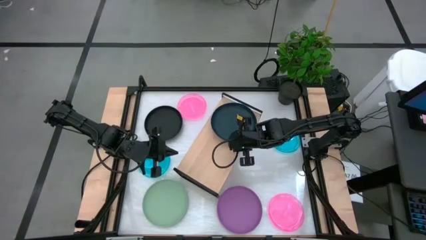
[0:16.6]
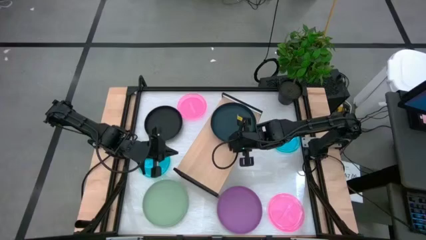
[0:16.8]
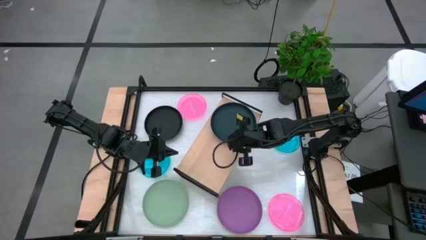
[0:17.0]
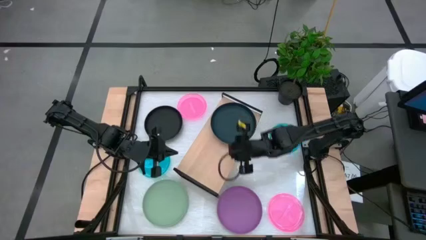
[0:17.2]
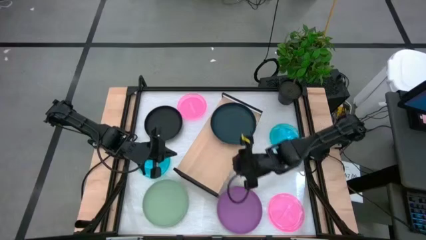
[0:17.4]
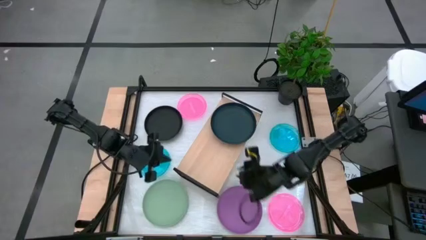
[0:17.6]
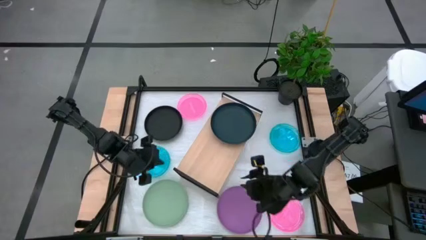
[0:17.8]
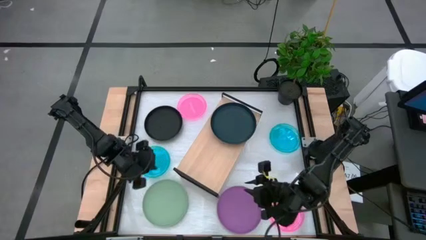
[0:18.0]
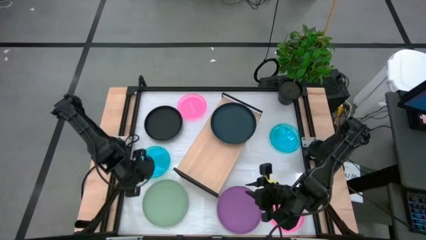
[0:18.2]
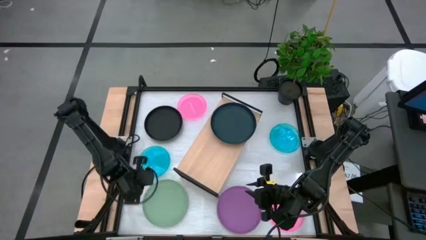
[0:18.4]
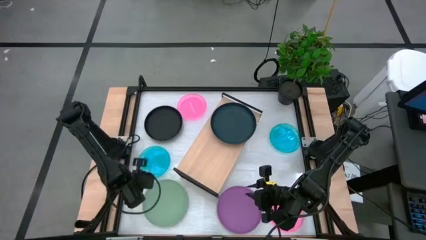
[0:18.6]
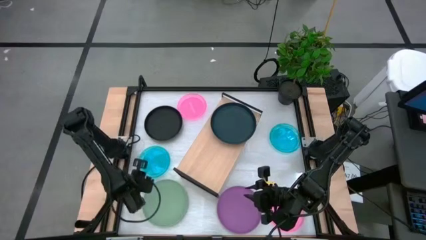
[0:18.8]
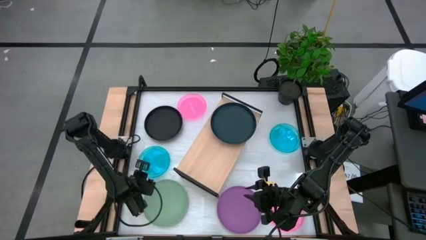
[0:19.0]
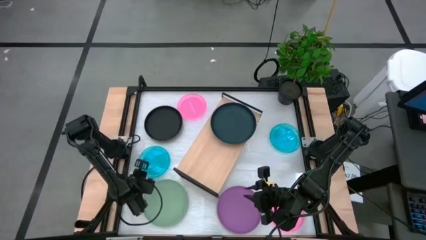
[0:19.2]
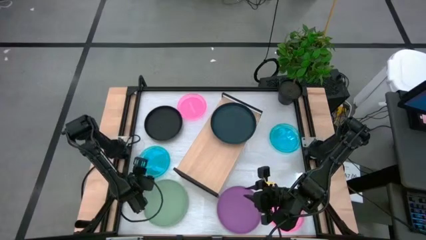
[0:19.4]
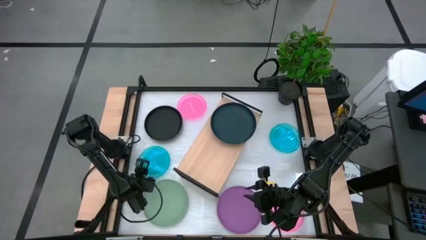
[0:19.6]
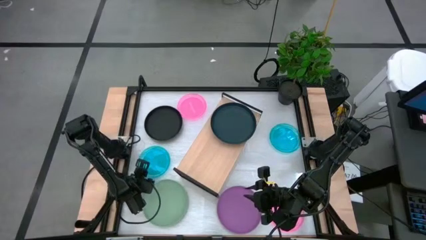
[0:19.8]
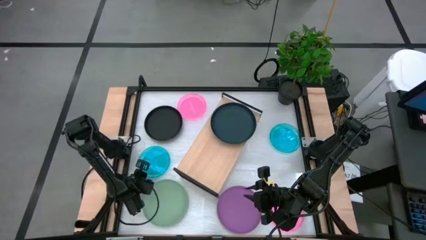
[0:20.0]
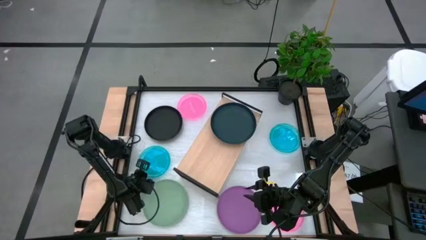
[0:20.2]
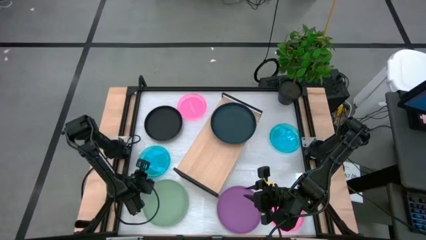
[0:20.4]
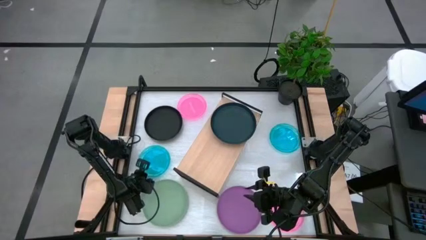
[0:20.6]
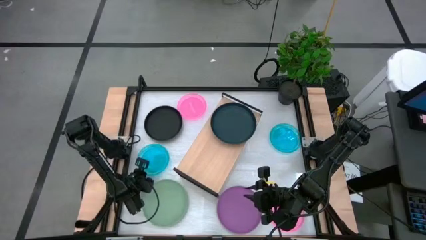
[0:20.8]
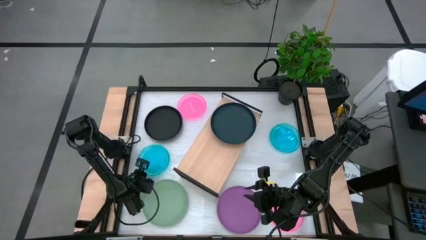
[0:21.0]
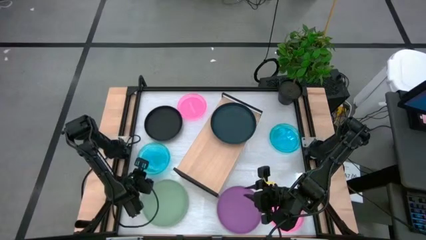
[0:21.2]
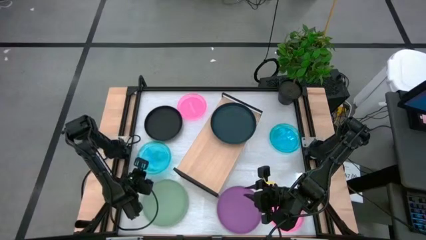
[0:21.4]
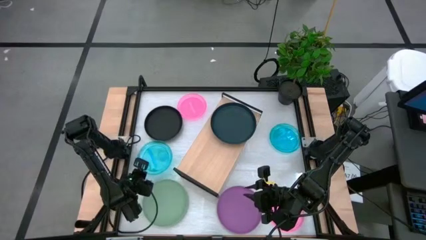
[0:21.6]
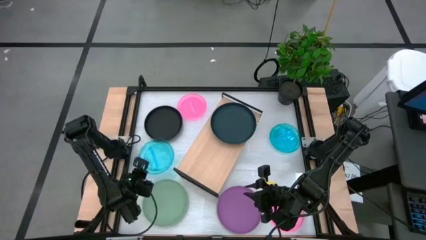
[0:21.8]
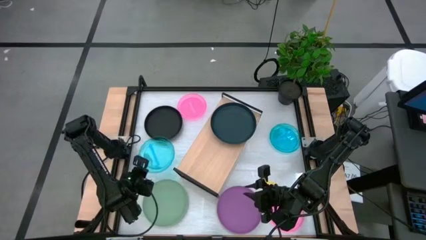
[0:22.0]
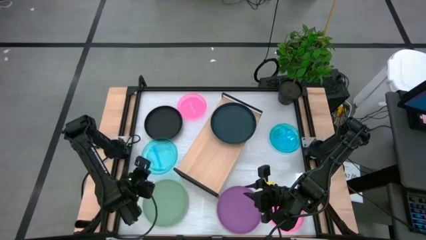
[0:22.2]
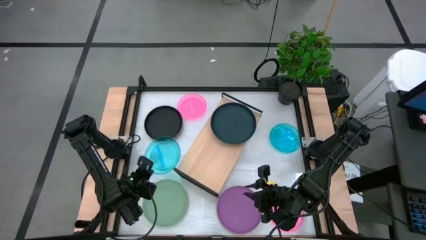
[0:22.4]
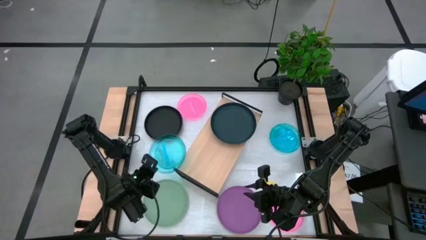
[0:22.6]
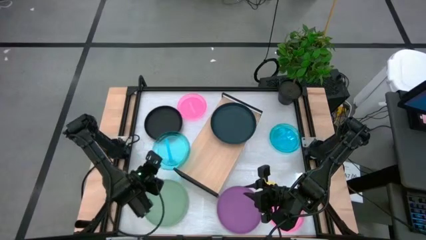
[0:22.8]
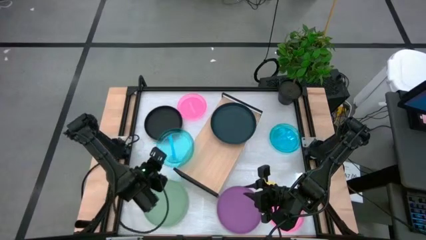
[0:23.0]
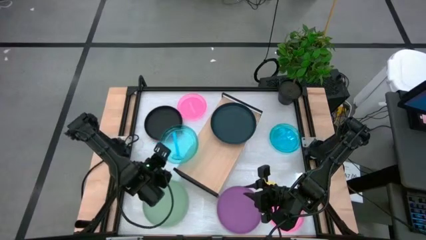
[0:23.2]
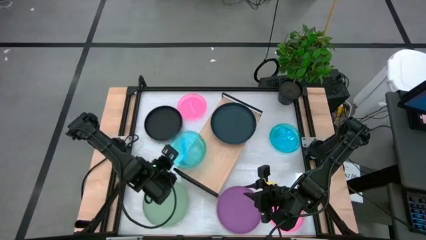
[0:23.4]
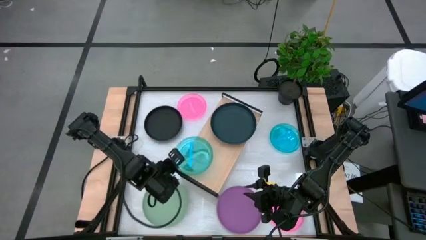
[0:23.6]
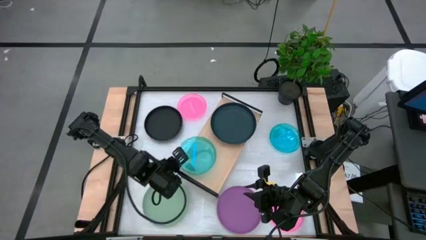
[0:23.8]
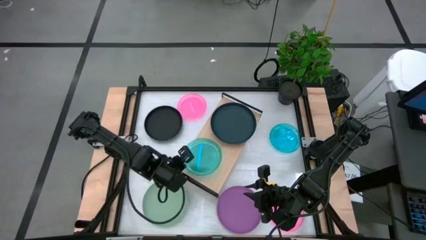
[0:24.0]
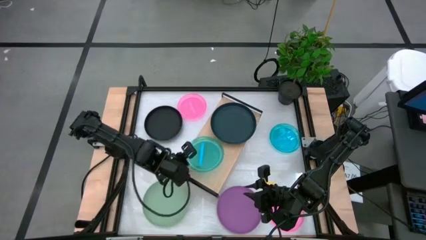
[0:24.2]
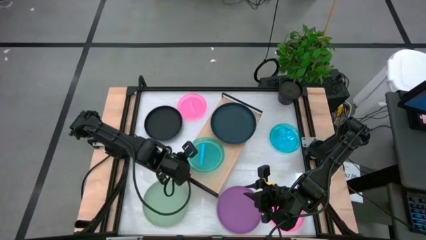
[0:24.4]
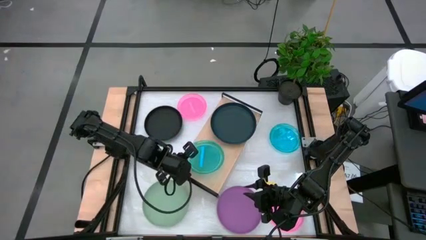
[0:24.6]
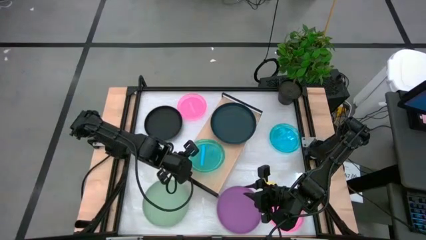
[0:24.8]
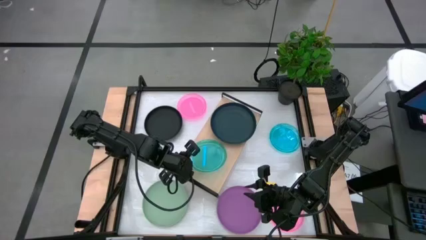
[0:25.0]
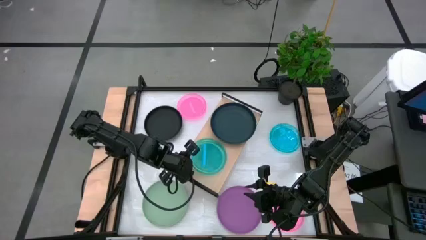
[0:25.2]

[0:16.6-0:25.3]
Task: Place and stack plates onto a shelf
Put the small transparent blue plate on top of the shelf

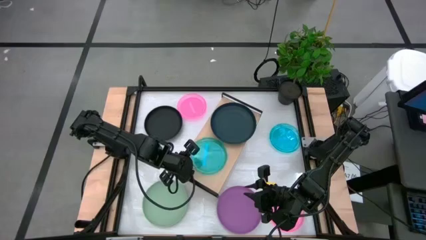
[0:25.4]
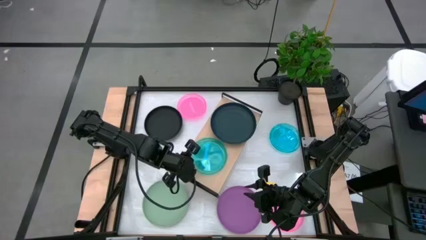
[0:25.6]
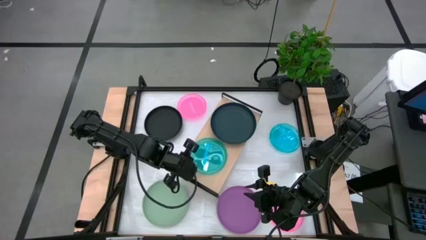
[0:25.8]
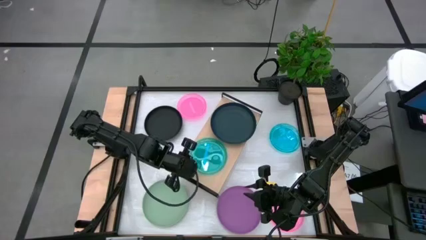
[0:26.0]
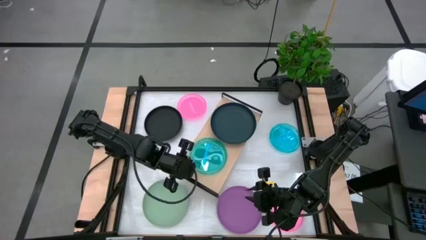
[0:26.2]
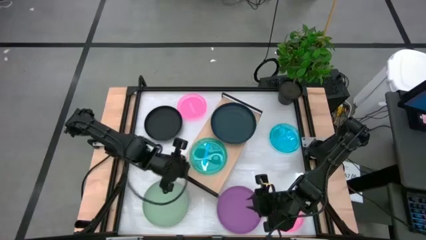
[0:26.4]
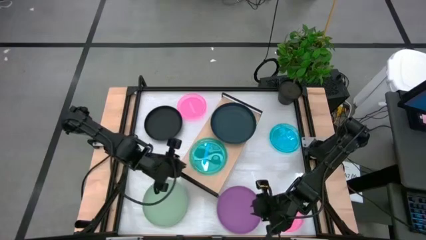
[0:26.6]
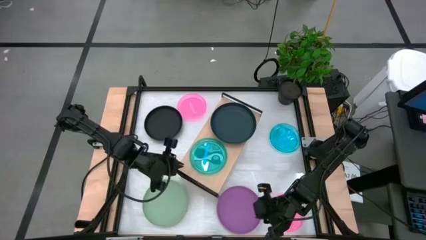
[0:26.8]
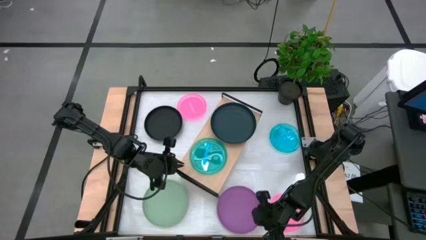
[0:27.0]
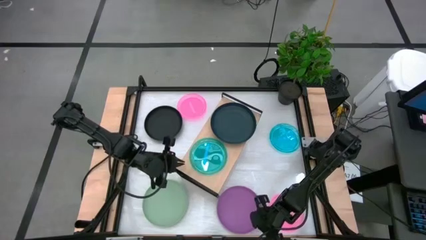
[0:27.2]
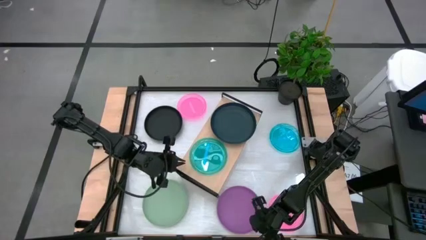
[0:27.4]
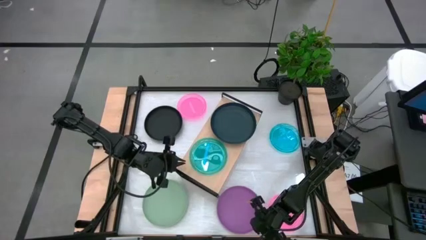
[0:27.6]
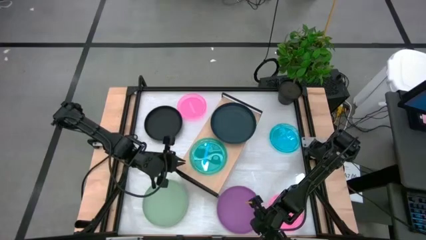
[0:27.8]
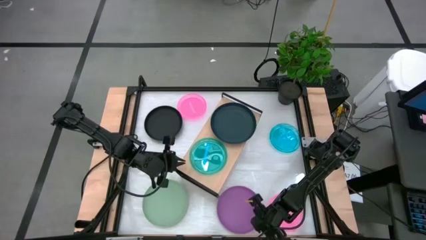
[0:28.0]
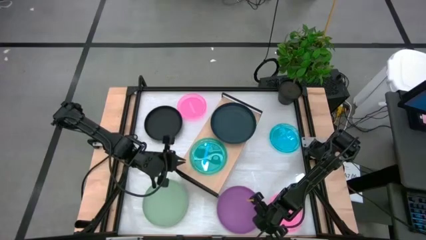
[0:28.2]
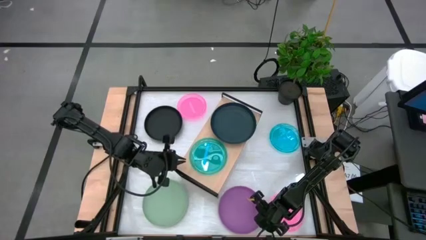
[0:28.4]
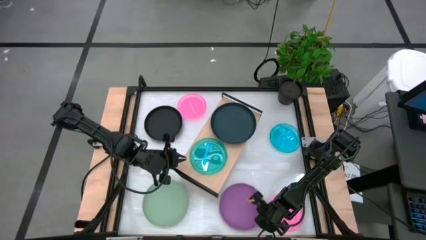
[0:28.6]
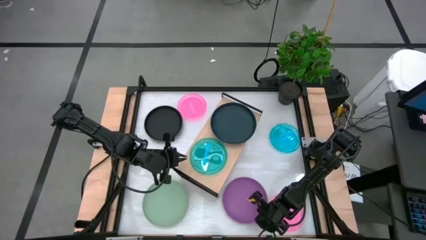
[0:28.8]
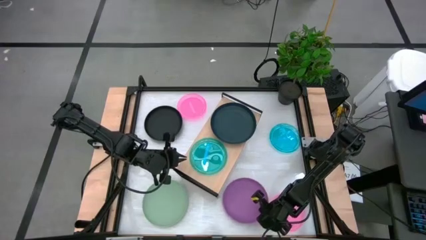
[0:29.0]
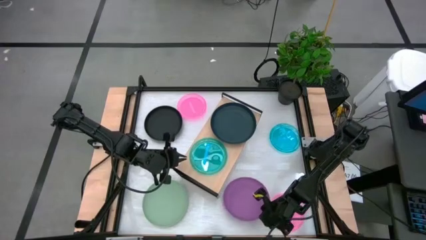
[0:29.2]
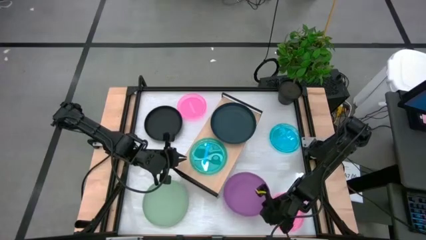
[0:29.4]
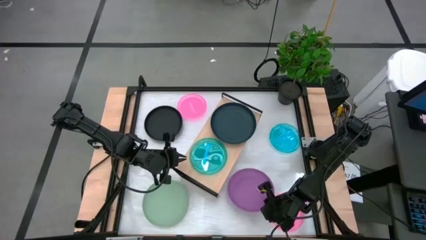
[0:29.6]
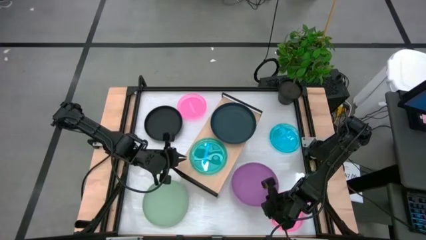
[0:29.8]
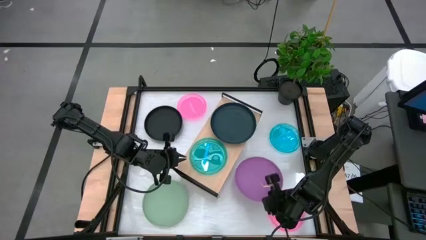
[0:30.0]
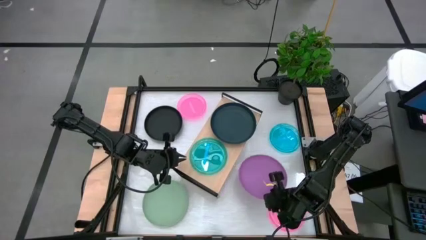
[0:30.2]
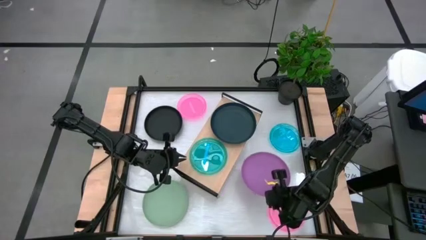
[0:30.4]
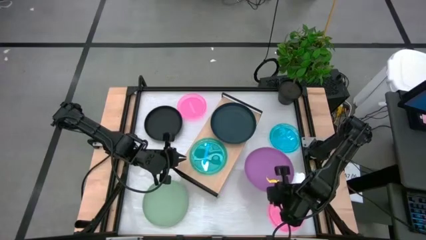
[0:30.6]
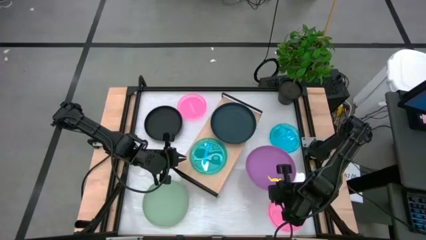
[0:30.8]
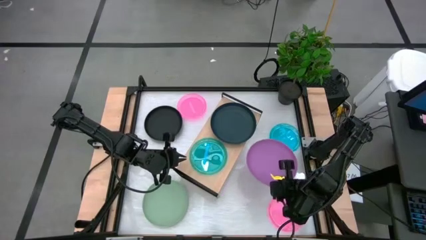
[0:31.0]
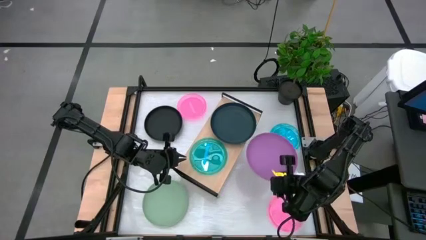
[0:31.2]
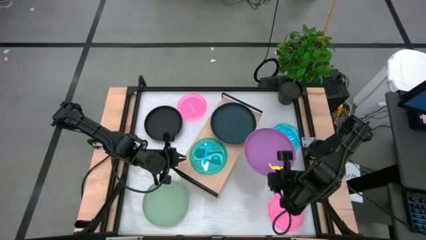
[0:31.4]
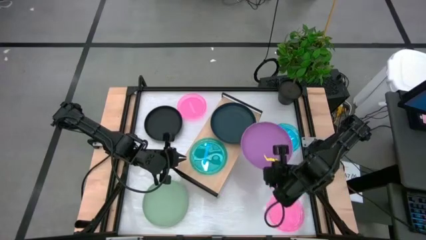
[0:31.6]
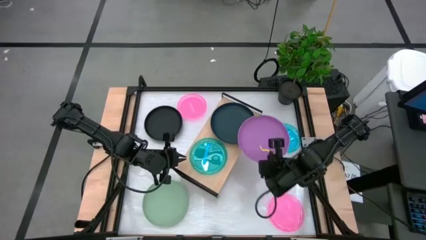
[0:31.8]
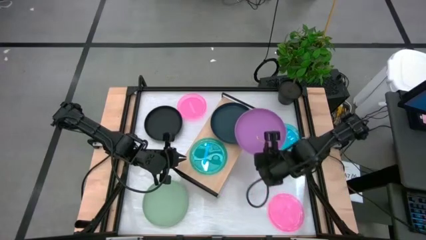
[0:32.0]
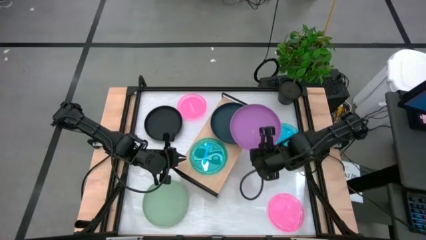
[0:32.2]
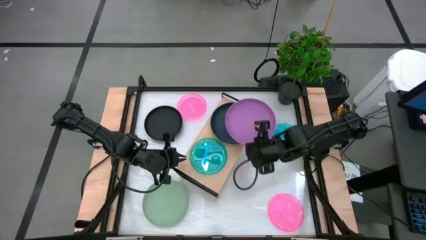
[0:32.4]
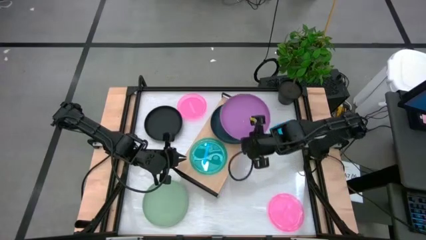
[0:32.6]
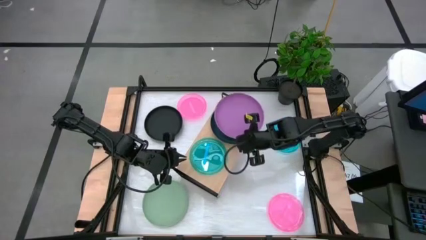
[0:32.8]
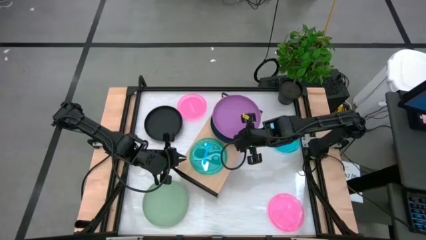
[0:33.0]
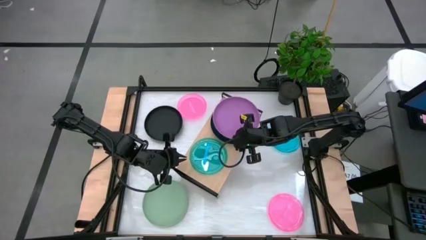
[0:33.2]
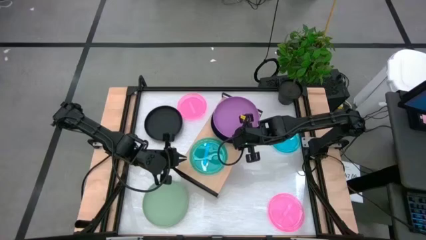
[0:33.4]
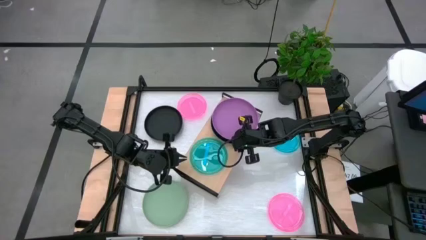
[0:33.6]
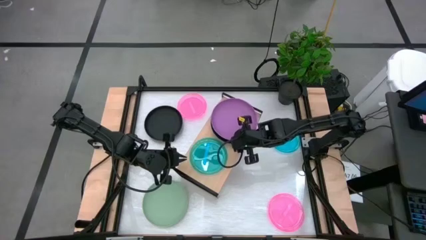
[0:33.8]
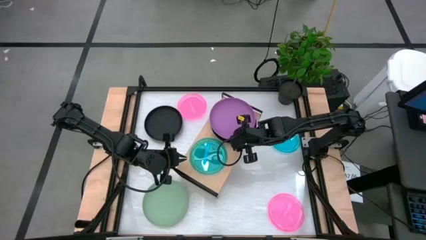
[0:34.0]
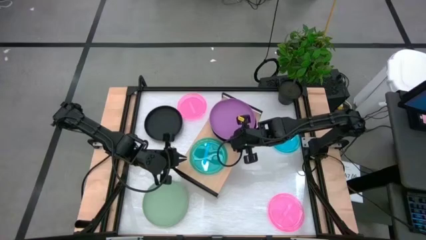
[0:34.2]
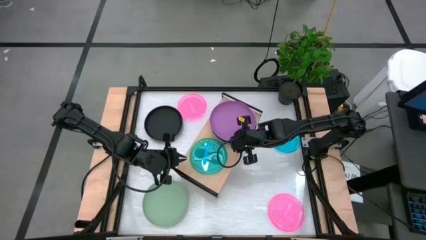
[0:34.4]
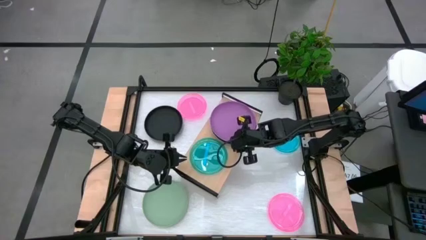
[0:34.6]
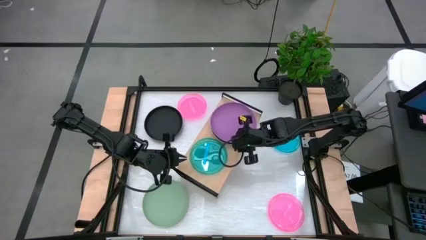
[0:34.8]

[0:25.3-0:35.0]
Stack the big violet plate on top of the big dark green plate
